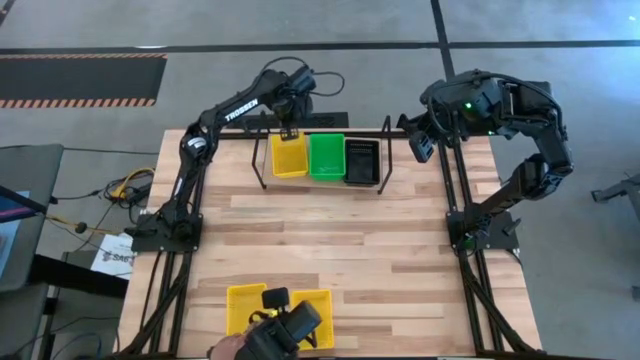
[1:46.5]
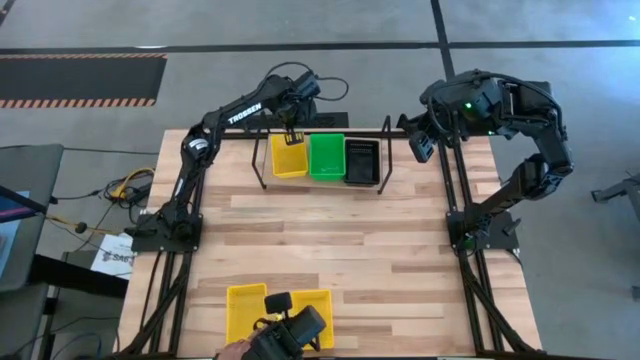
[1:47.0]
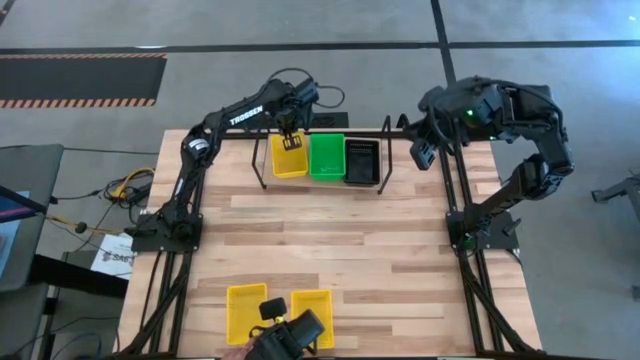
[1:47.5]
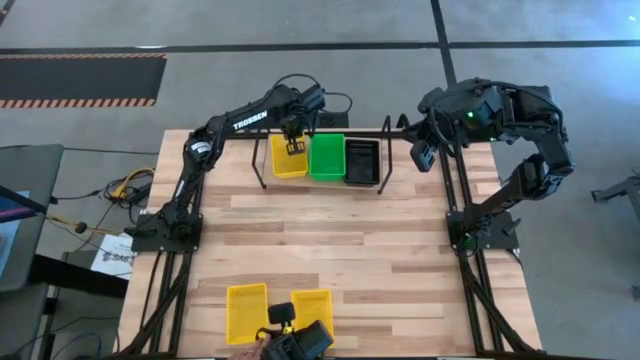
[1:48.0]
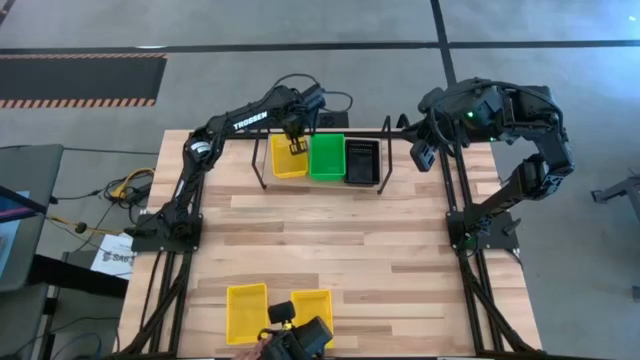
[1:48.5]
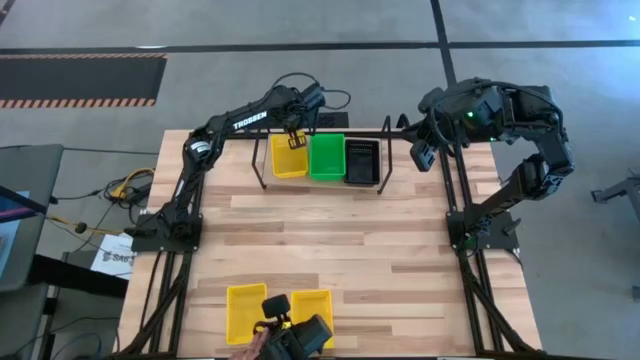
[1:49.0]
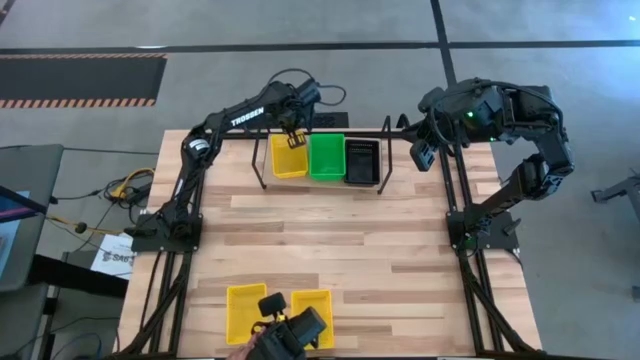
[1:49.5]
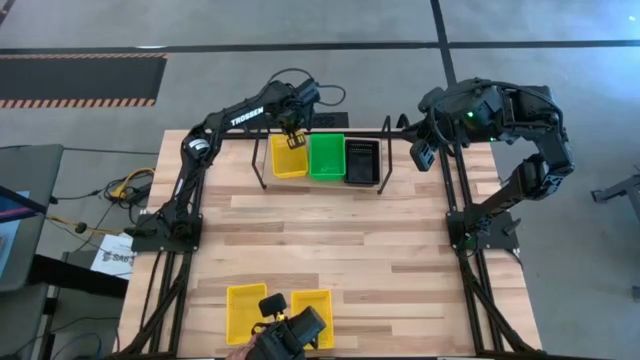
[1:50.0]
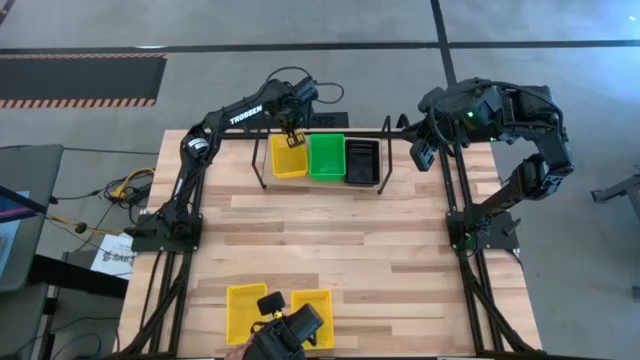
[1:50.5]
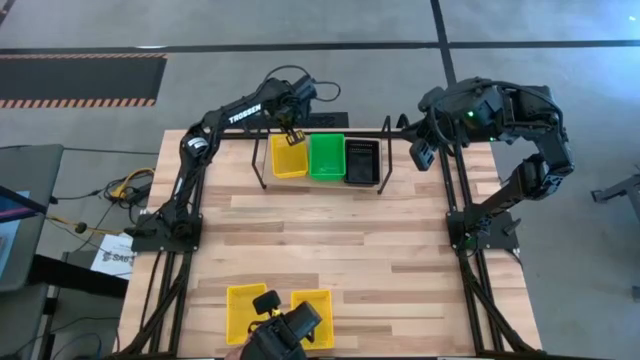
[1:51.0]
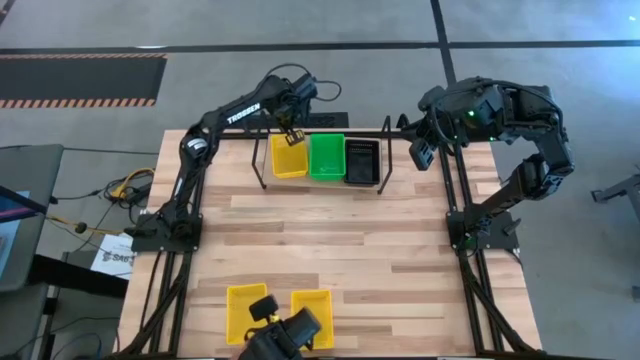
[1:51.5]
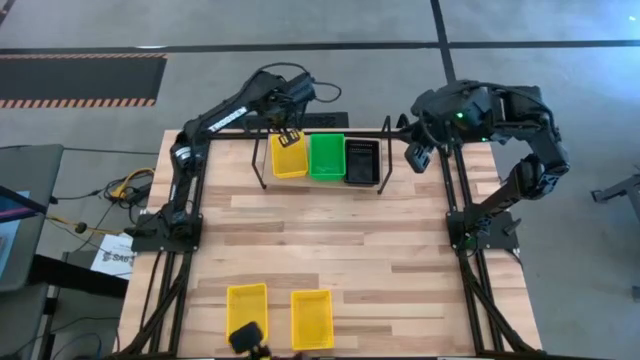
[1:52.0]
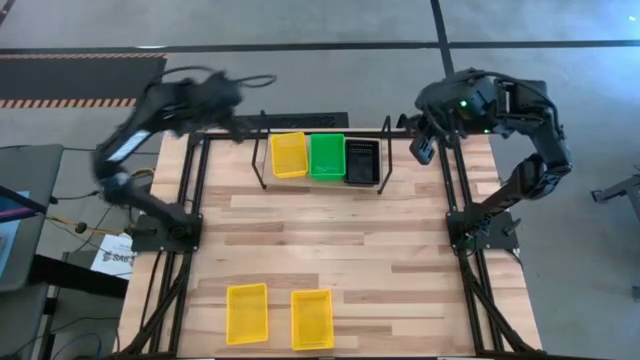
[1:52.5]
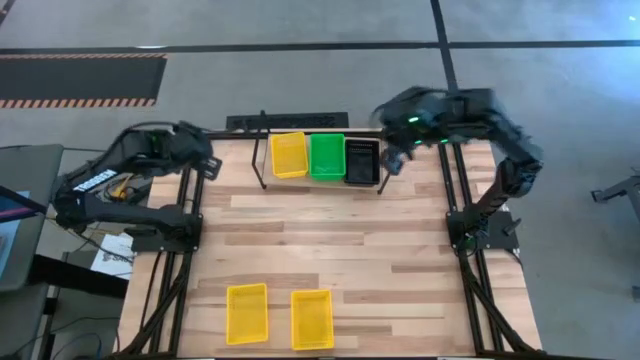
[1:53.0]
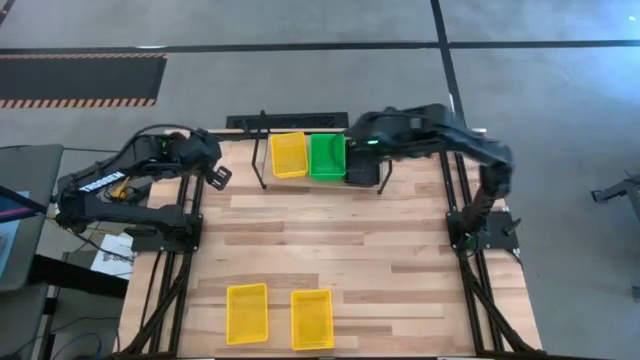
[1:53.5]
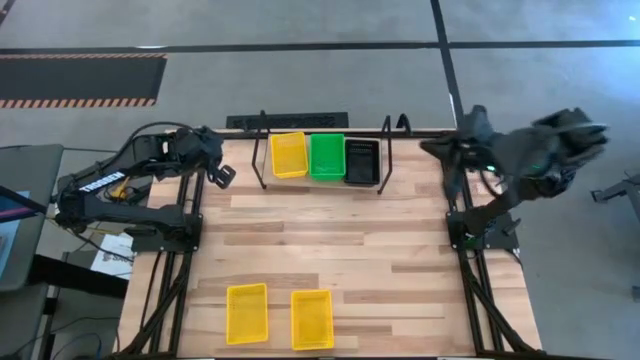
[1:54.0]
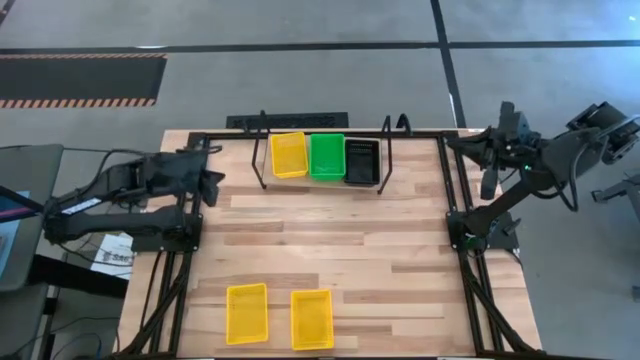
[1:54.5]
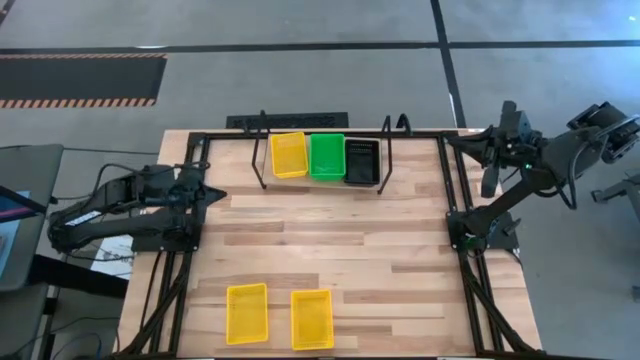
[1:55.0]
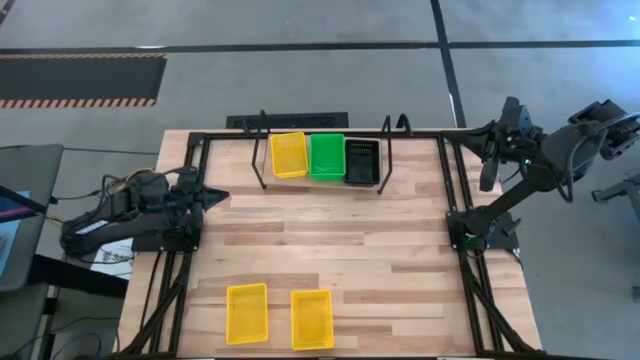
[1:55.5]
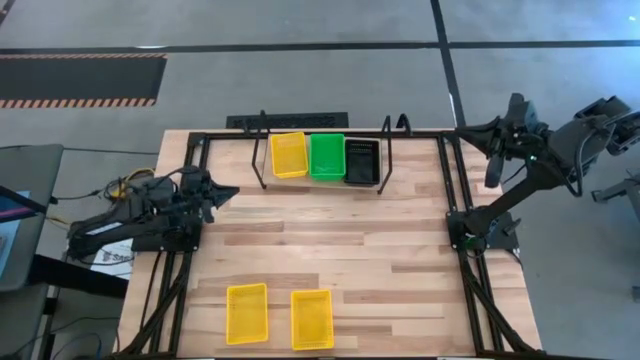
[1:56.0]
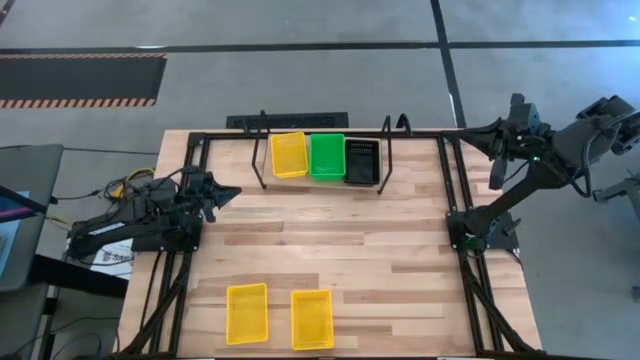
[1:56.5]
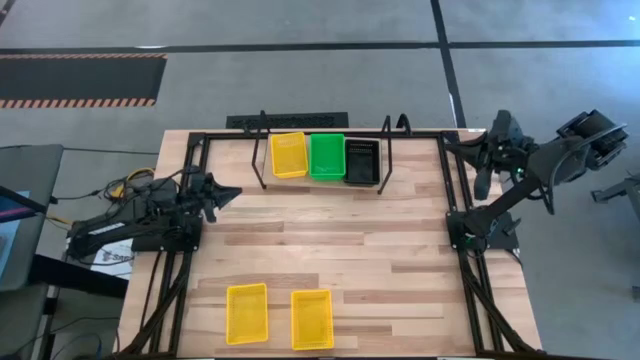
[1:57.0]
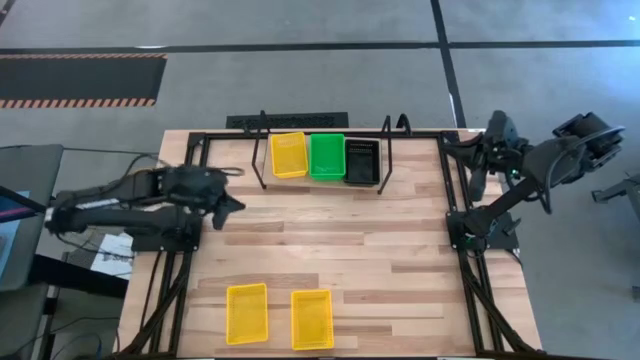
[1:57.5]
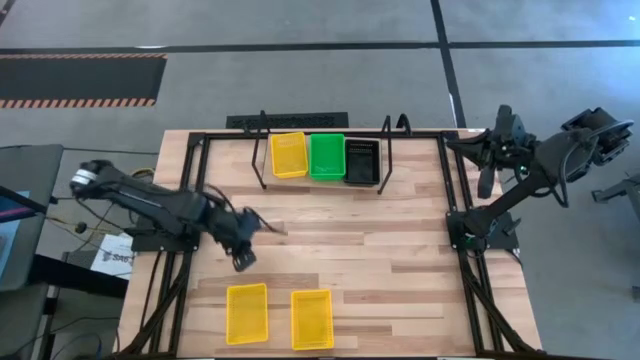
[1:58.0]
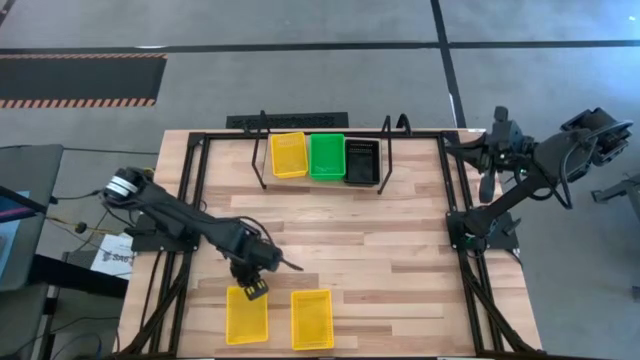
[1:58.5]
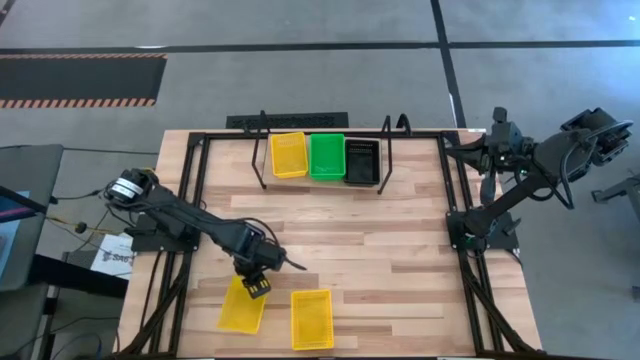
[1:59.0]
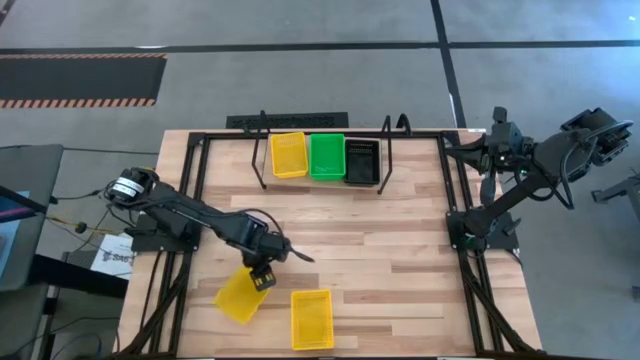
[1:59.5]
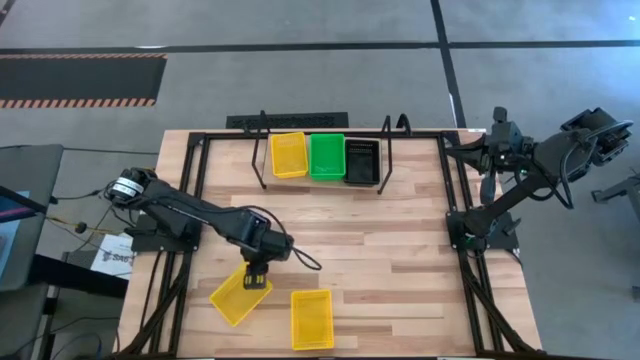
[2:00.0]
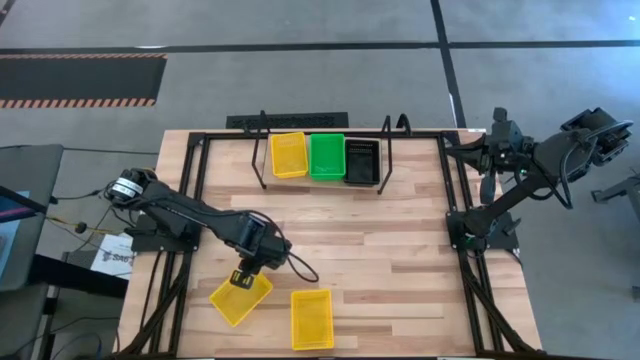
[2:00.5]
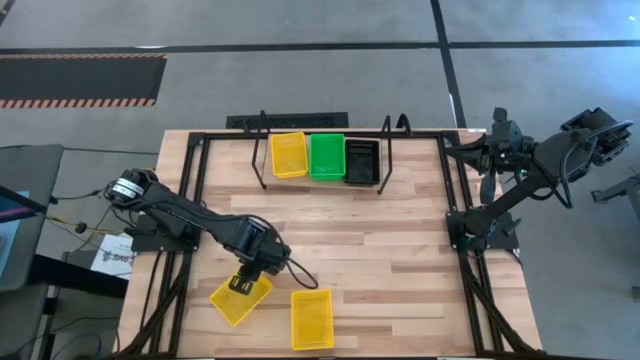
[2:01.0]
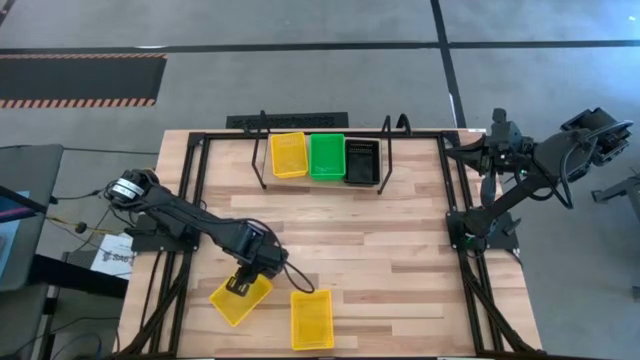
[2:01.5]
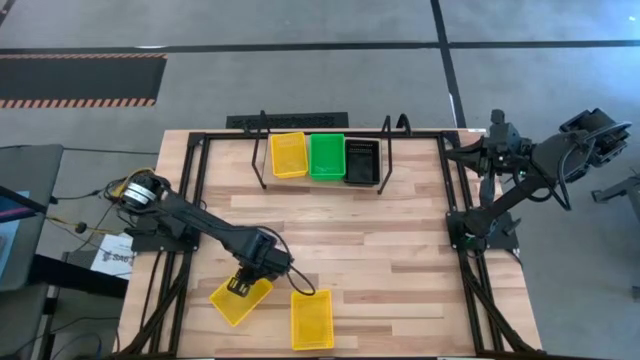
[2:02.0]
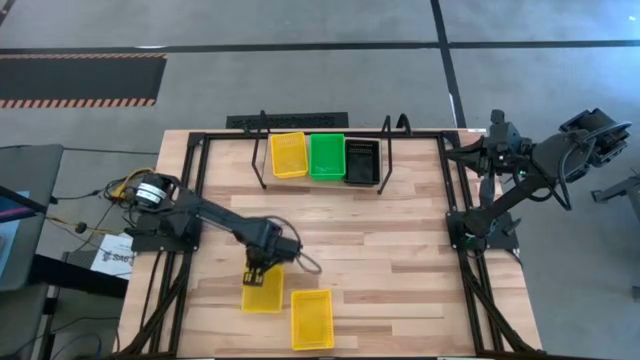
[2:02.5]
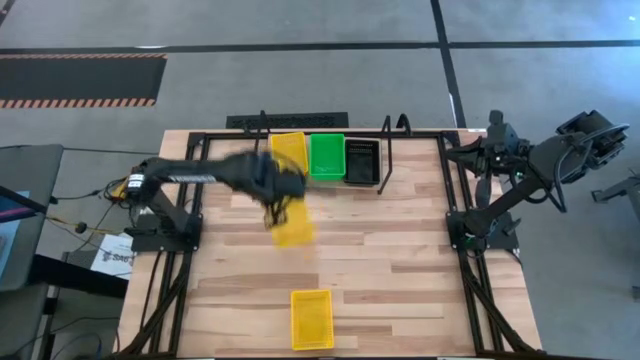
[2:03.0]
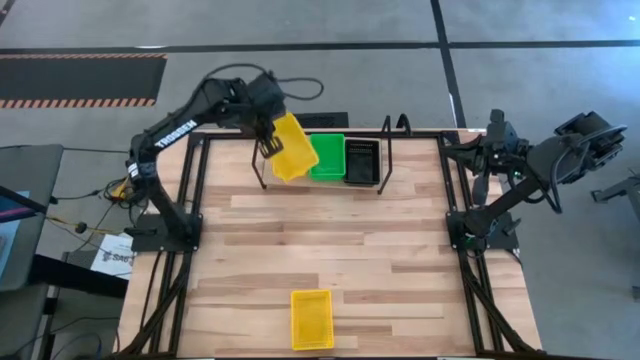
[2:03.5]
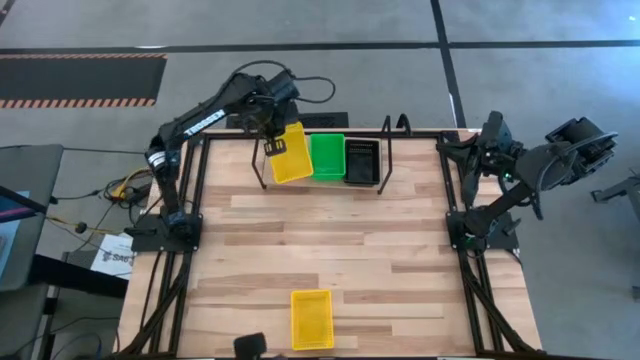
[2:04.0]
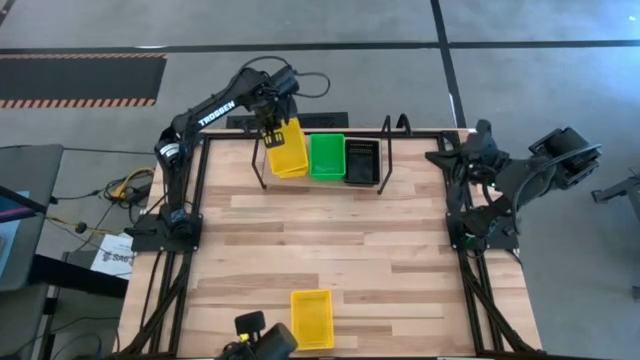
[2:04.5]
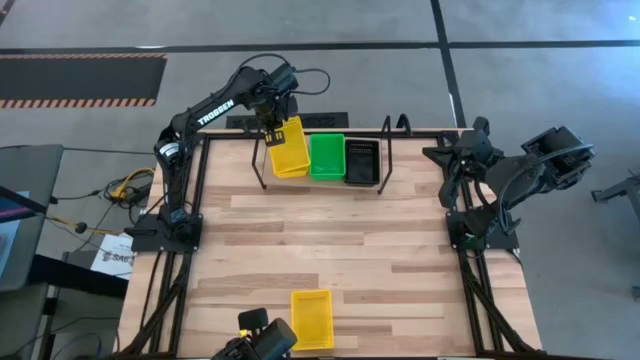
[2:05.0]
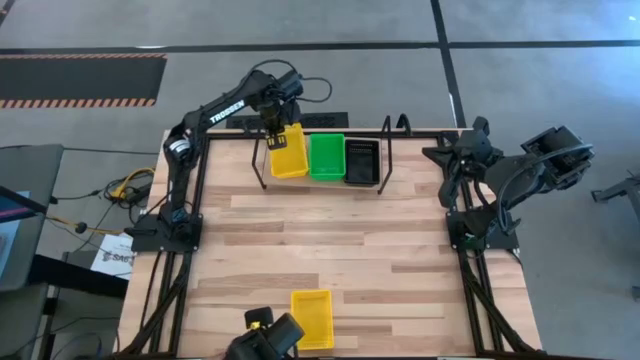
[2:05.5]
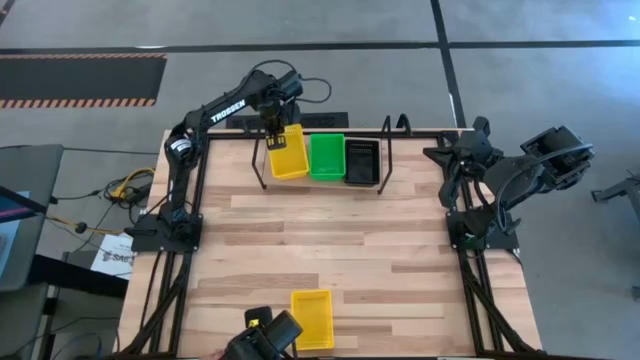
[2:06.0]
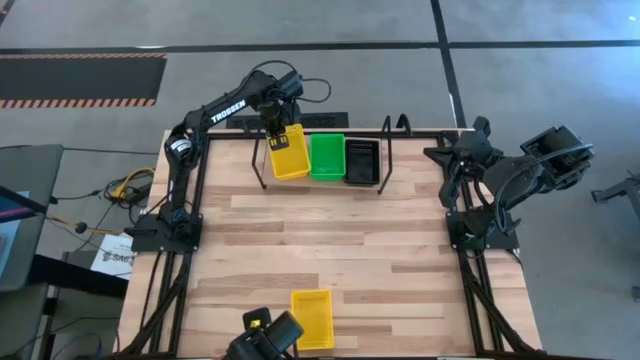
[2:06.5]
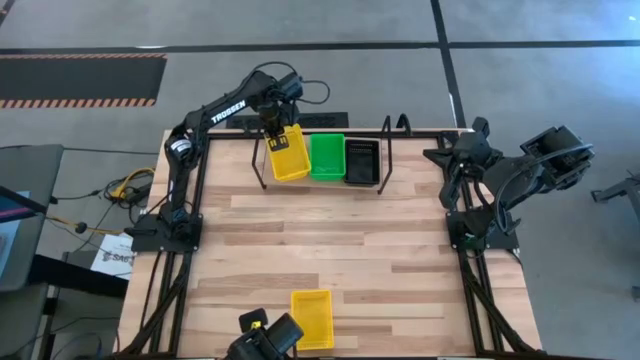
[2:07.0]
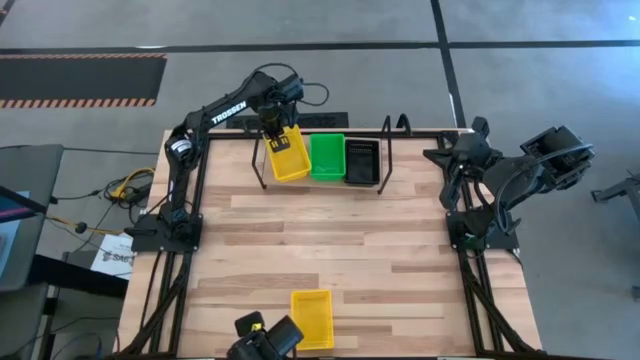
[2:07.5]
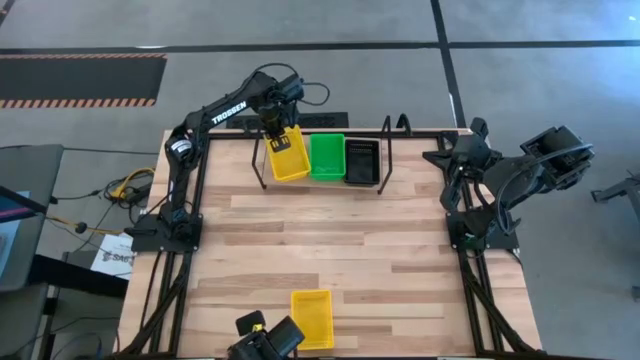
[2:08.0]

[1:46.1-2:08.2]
Task: Stack baskets on shelf by color
Stack the left yellow basket on top of the other yellow basket on the shelf
